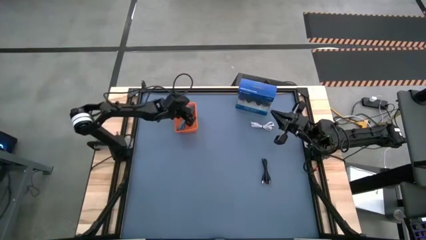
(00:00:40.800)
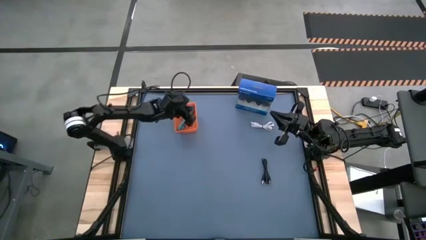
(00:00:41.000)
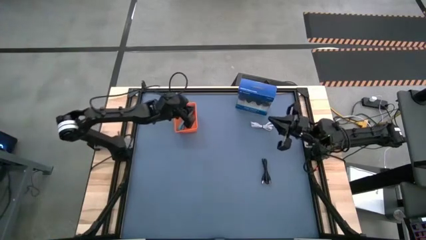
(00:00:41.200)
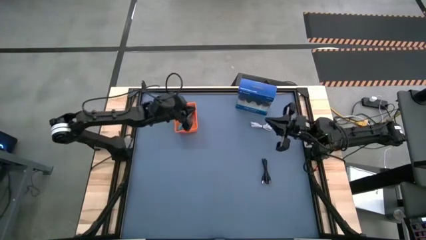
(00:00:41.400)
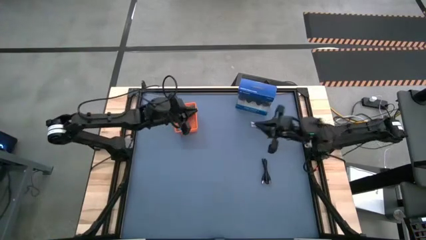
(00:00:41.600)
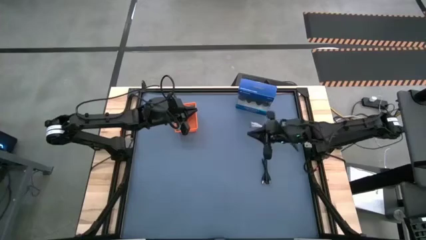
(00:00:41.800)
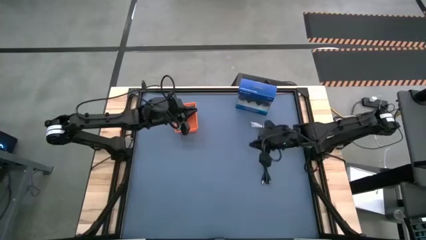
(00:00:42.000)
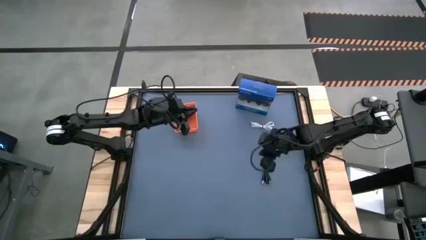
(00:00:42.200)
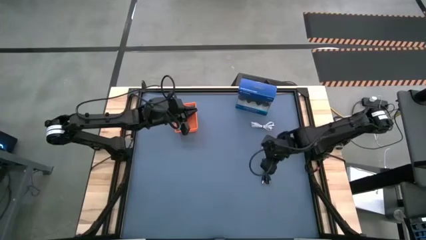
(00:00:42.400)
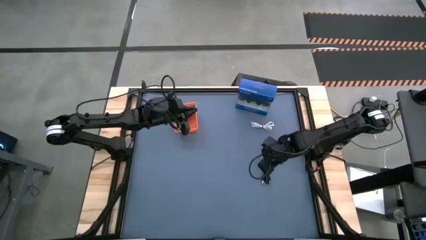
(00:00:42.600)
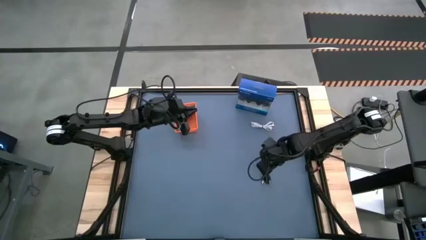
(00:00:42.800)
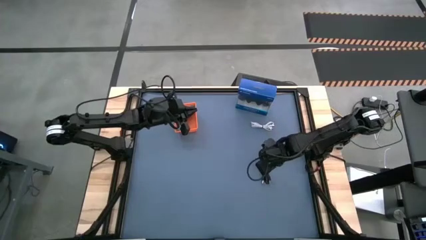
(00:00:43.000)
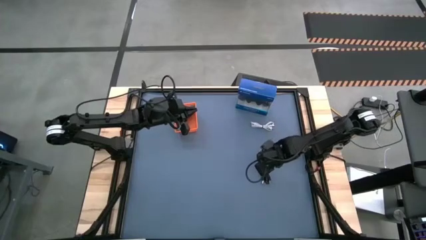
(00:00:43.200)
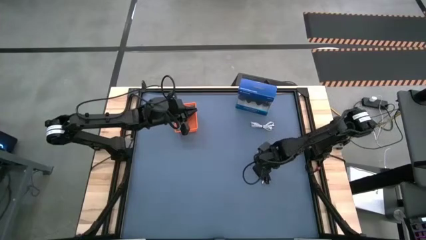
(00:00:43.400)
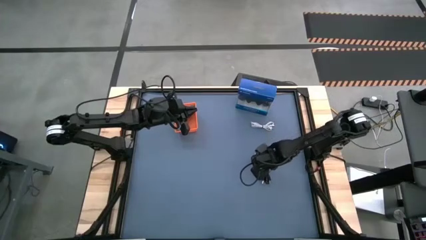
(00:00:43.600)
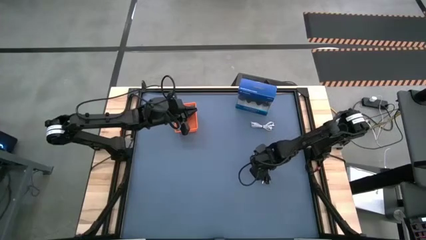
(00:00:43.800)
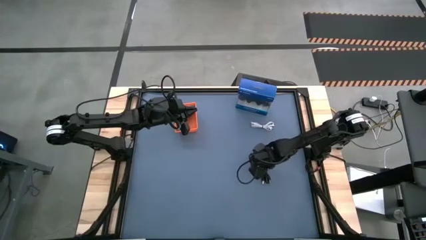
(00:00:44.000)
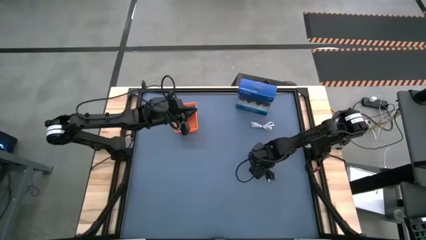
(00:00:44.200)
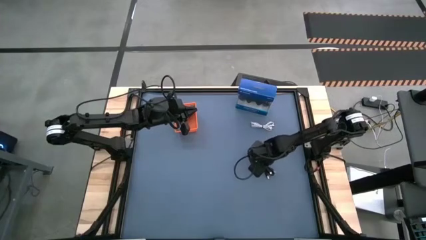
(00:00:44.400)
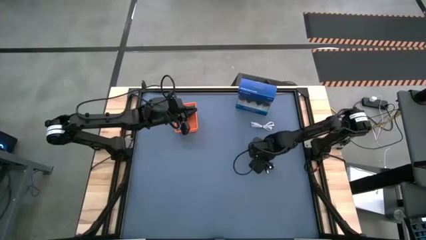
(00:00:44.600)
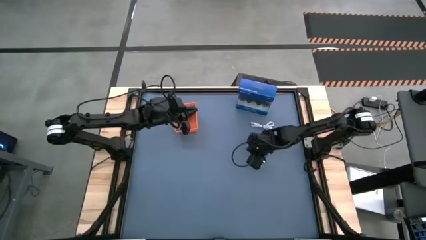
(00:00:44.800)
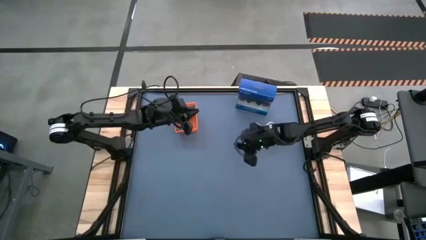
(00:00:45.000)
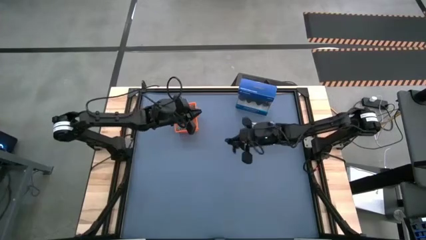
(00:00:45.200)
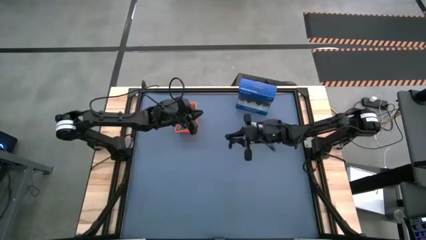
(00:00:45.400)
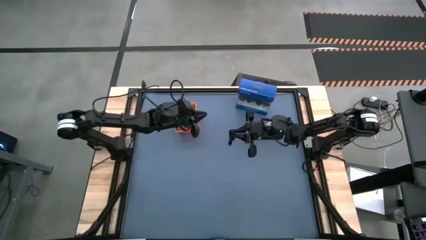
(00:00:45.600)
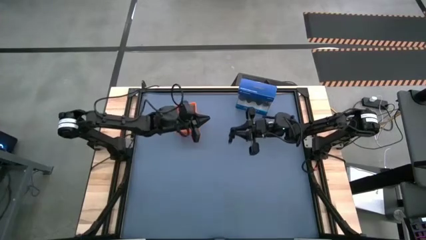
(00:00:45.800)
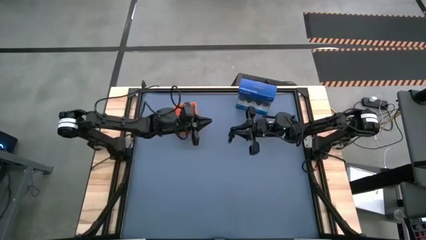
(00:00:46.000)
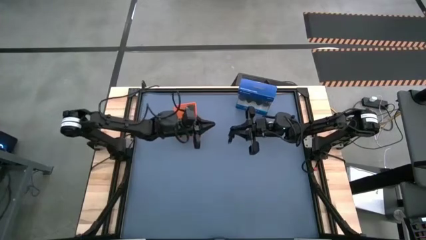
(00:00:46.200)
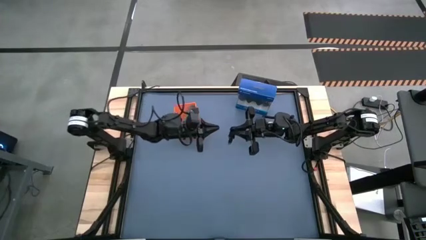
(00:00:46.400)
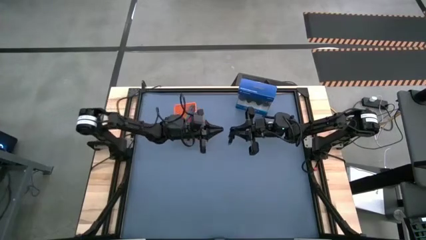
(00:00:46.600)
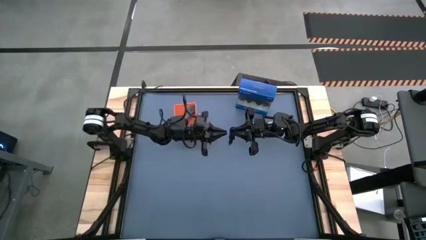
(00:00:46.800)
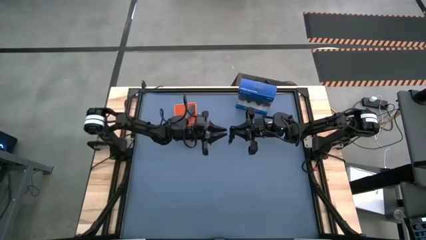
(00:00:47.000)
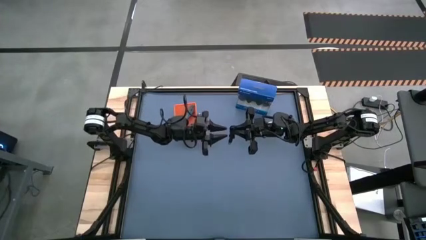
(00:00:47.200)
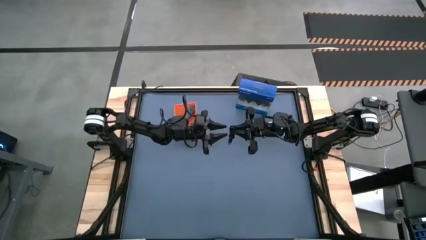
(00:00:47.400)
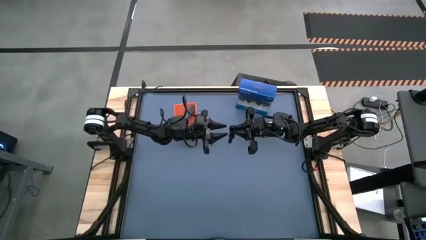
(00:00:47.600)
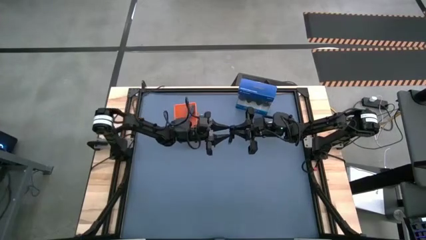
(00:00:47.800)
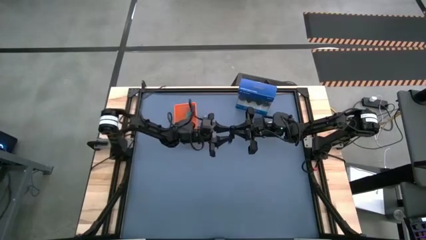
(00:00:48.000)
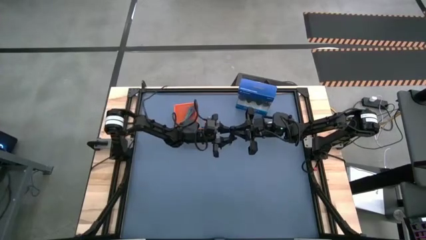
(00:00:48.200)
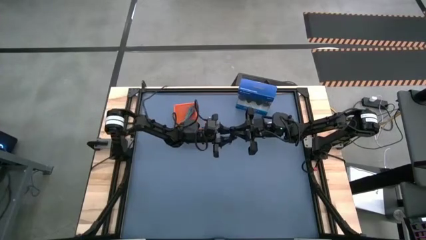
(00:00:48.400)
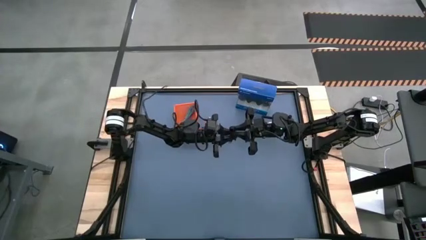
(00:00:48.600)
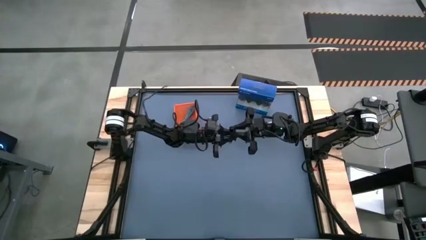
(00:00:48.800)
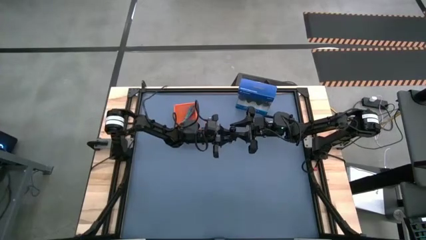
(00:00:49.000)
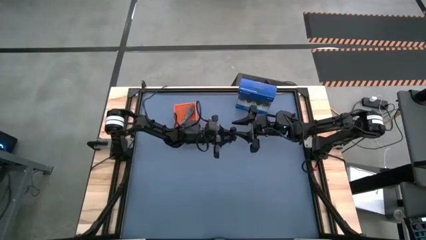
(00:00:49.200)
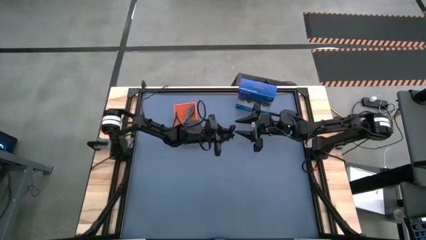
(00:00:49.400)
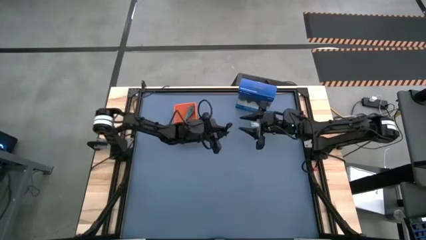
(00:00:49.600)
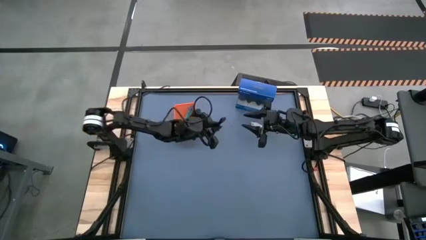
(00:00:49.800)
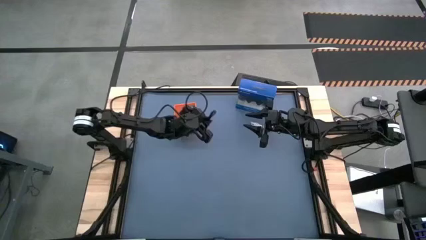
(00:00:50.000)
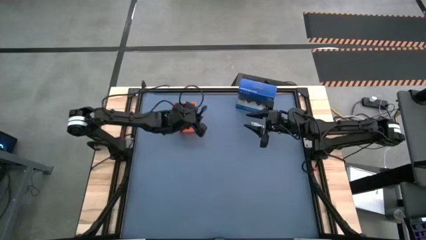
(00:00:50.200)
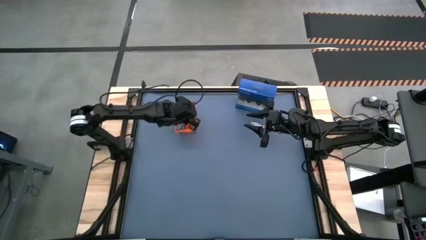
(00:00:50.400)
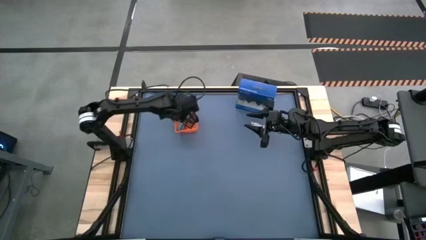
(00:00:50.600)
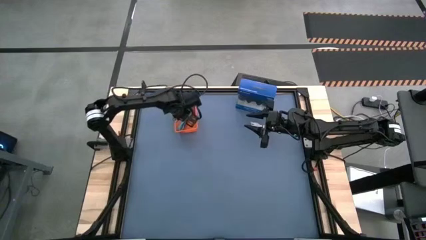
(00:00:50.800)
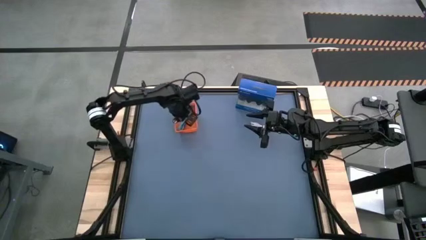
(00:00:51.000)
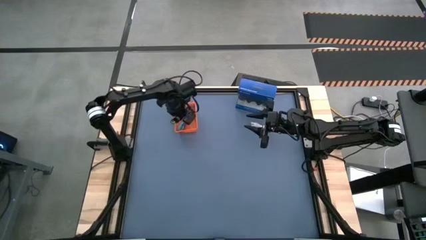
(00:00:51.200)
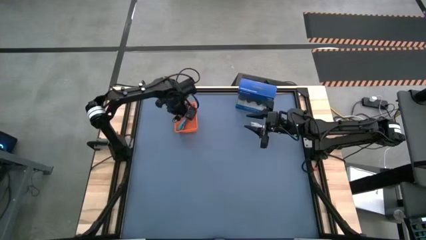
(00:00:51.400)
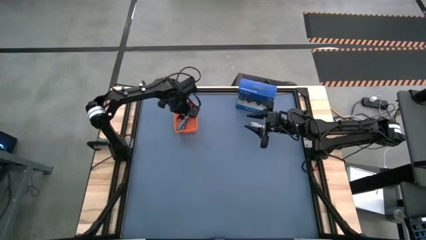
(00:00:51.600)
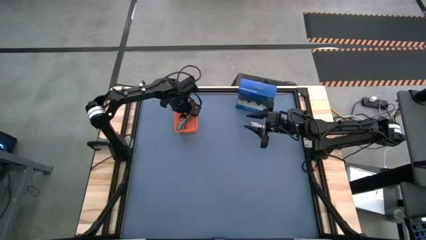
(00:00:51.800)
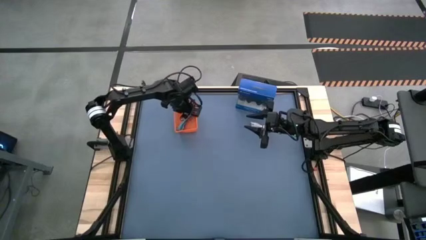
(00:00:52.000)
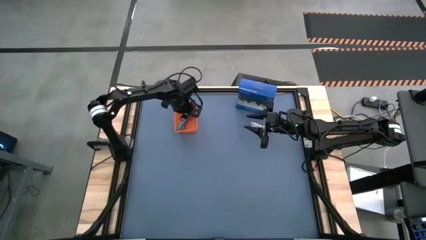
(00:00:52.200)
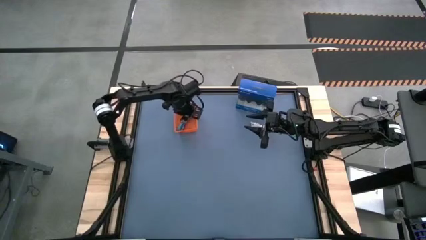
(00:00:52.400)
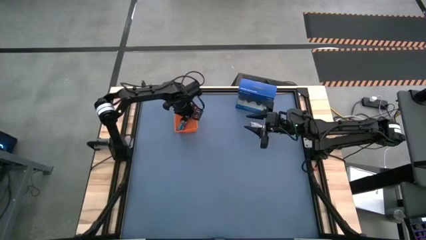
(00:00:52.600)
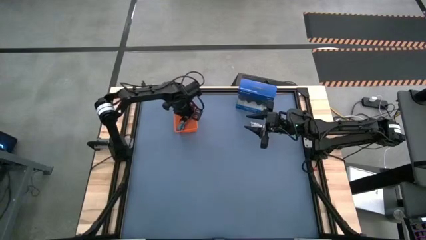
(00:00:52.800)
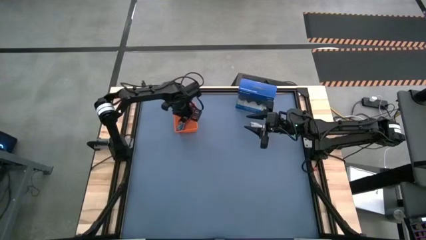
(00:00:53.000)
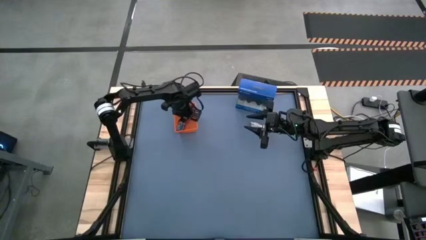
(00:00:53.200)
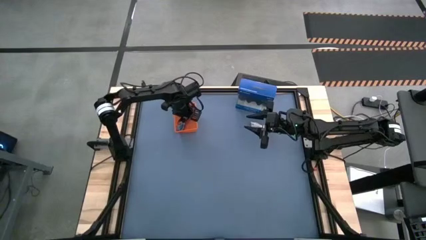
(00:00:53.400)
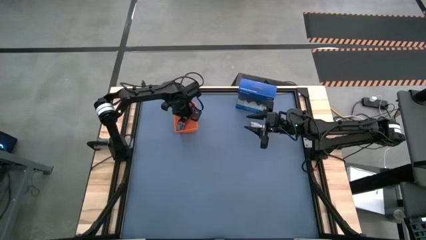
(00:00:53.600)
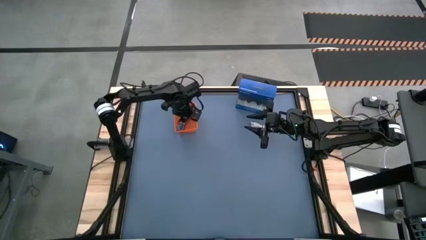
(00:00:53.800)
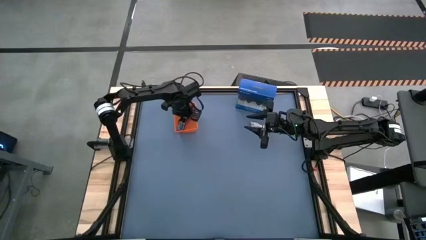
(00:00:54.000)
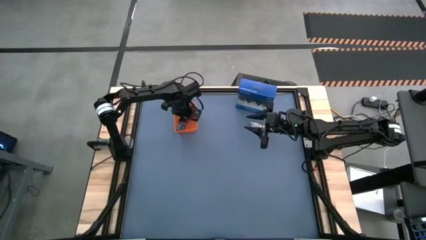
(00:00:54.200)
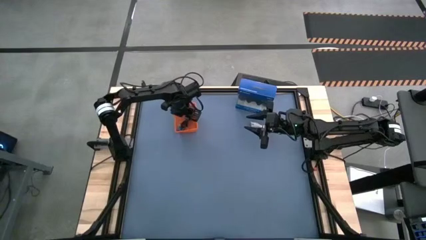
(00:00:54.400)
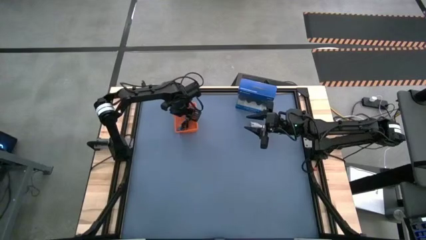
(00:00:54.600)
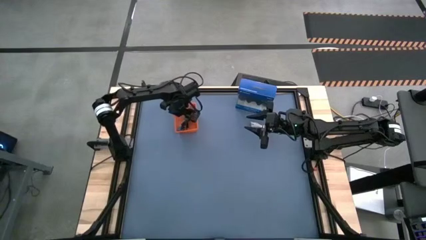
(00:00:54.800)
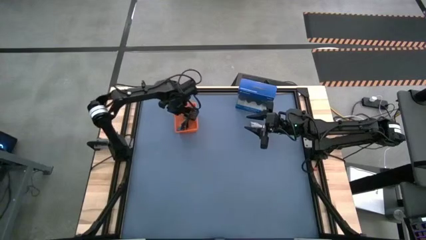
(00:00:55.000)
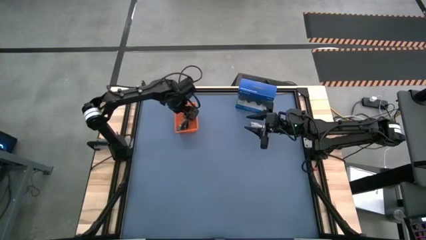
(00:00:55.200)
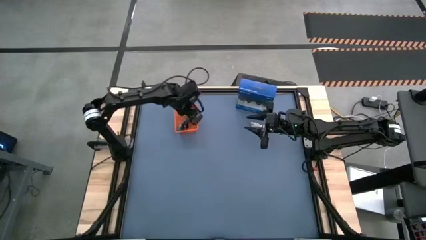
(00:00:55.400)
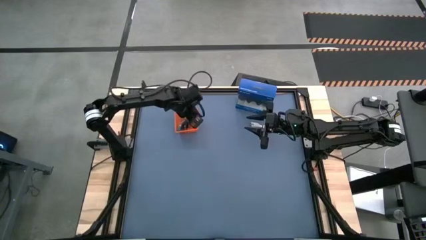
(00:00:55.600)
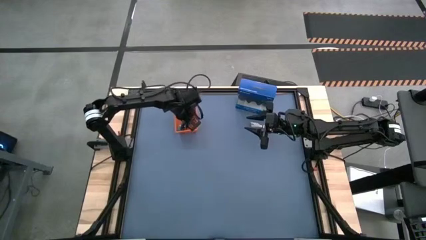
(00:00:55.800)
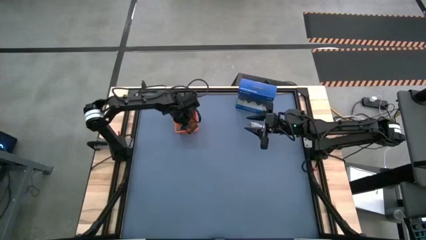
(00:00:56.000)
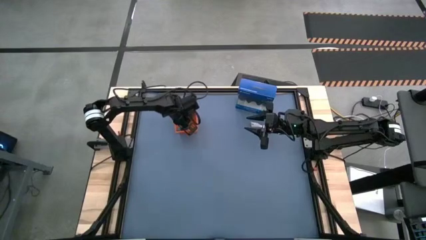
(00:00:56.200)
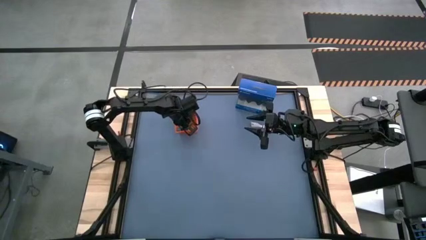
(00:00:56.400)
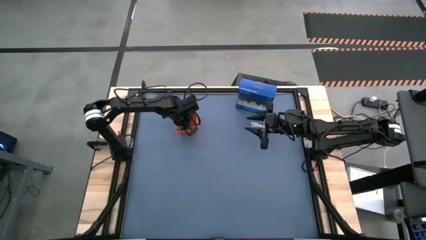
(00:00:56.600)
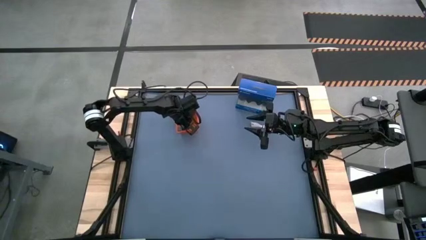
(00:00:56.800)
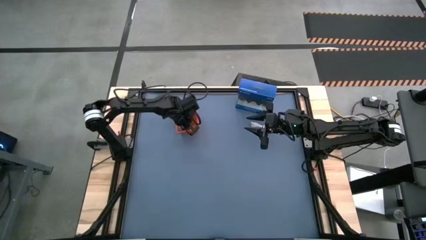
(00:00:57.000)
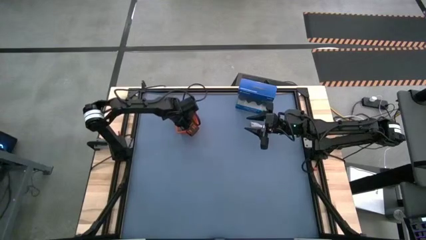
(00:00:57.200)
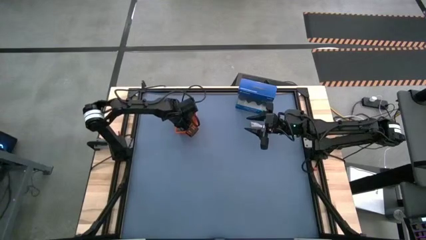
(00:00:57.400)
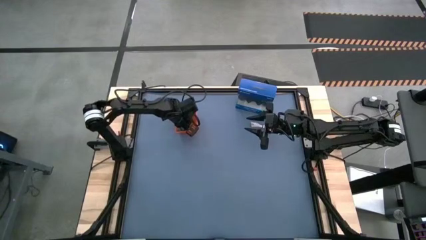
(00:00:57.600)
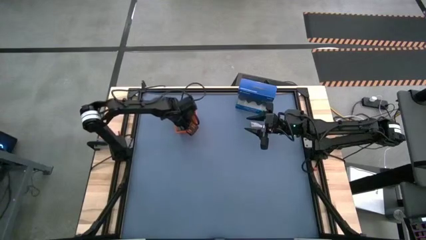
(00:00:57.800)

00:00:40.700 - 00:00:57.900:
Task: Pick and place USB-C Cables
Put the black charger cable into the orange bin
